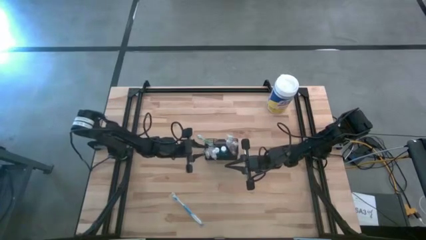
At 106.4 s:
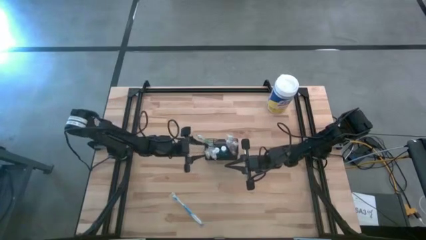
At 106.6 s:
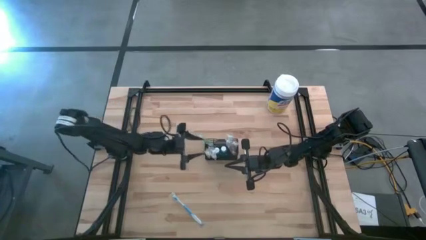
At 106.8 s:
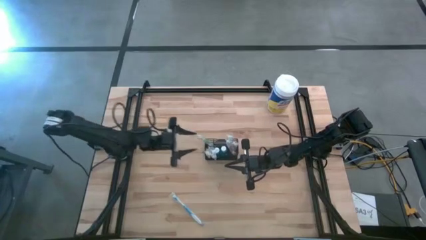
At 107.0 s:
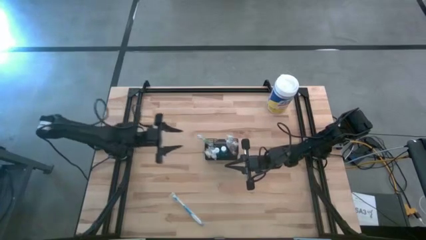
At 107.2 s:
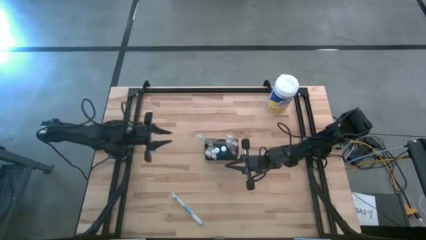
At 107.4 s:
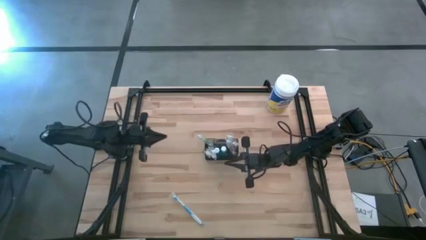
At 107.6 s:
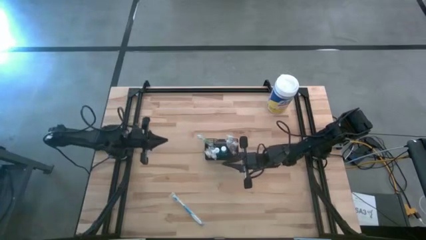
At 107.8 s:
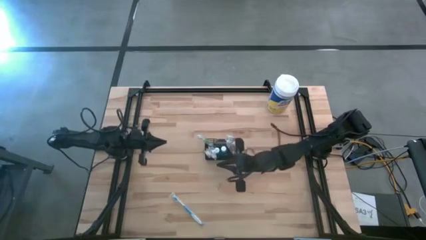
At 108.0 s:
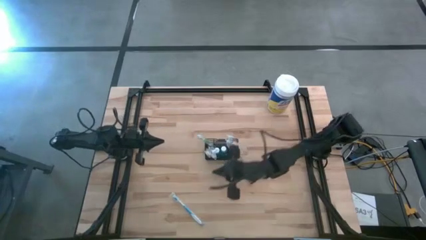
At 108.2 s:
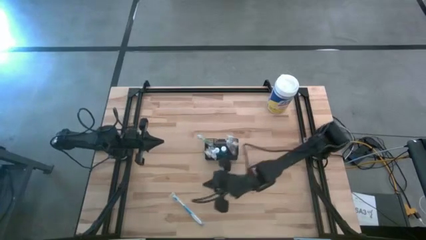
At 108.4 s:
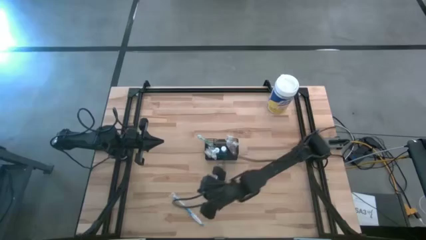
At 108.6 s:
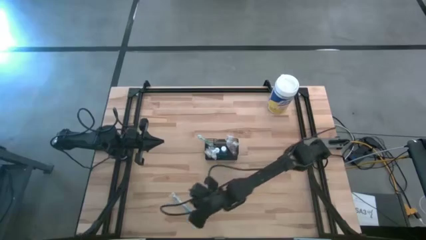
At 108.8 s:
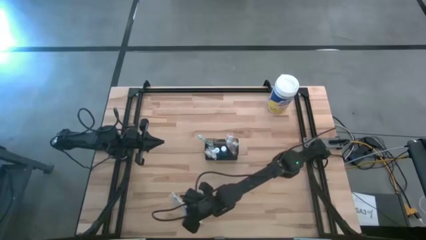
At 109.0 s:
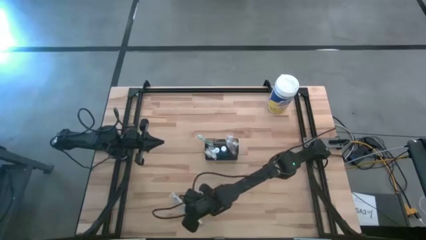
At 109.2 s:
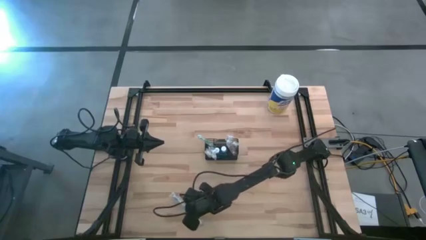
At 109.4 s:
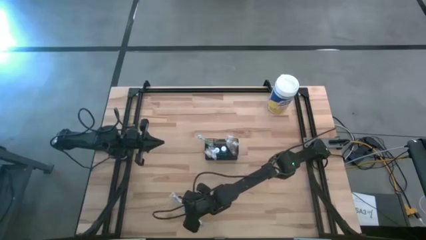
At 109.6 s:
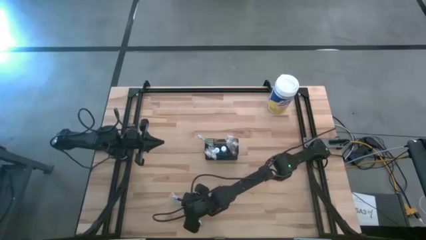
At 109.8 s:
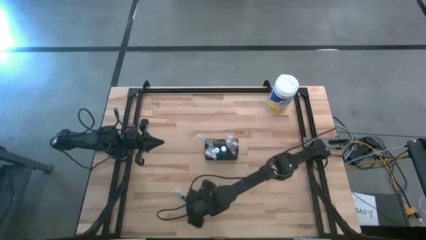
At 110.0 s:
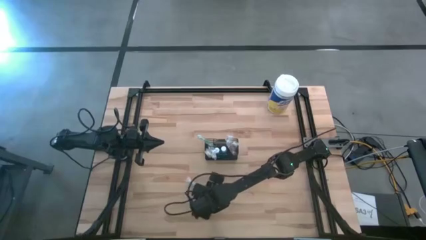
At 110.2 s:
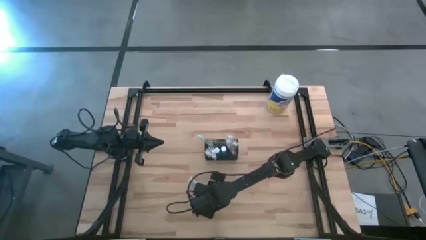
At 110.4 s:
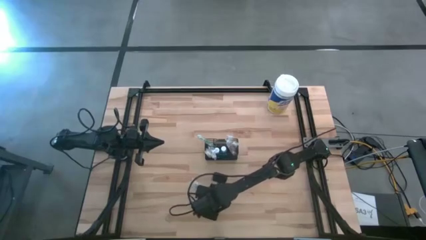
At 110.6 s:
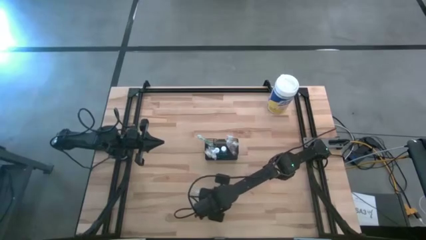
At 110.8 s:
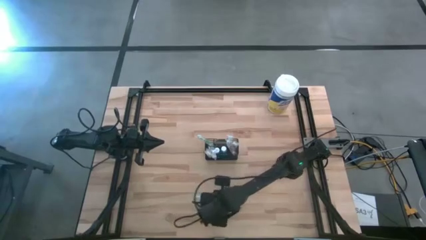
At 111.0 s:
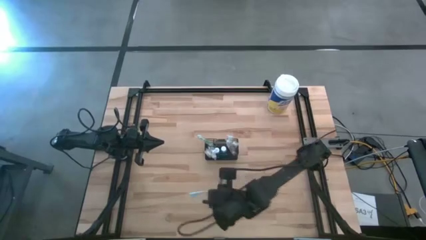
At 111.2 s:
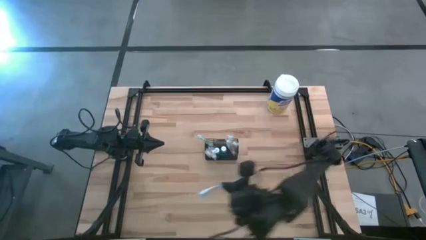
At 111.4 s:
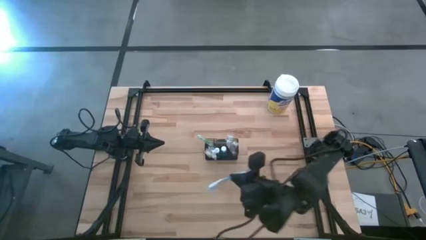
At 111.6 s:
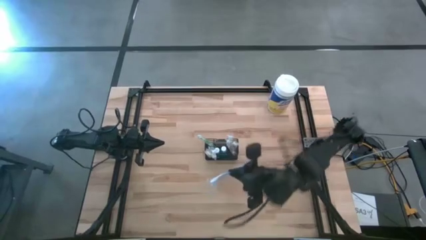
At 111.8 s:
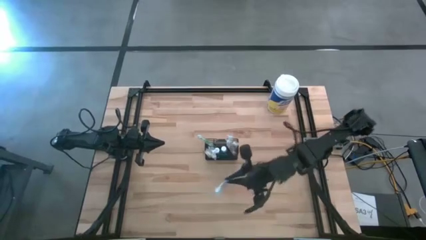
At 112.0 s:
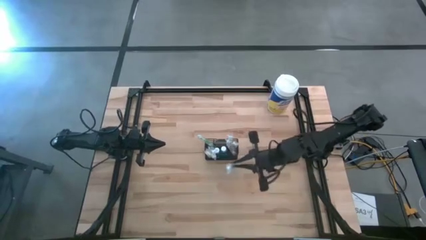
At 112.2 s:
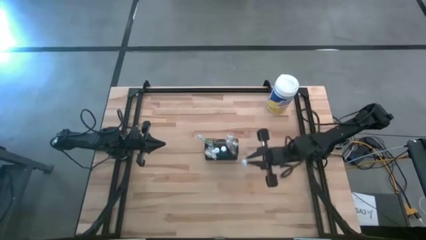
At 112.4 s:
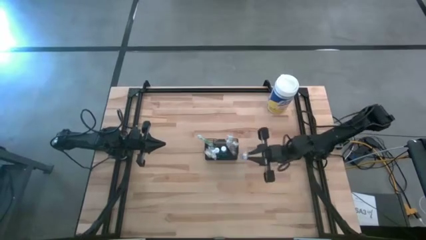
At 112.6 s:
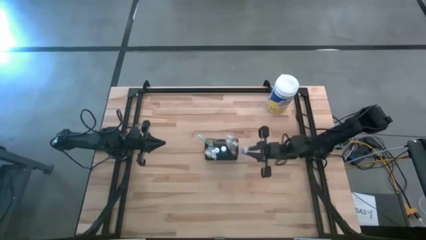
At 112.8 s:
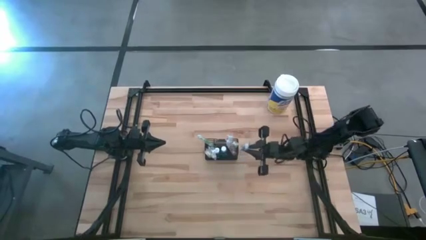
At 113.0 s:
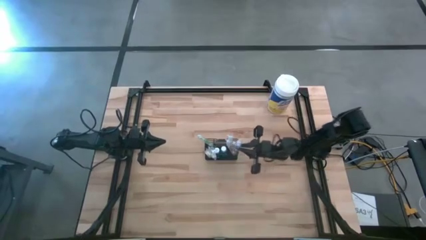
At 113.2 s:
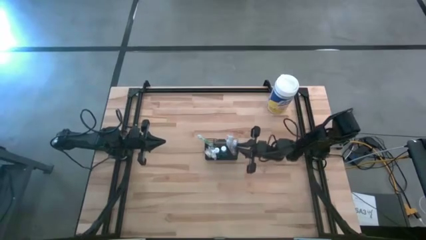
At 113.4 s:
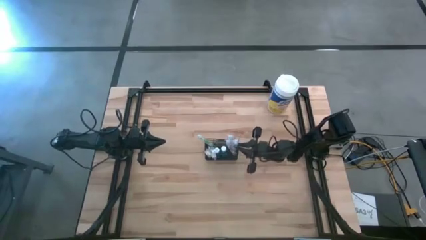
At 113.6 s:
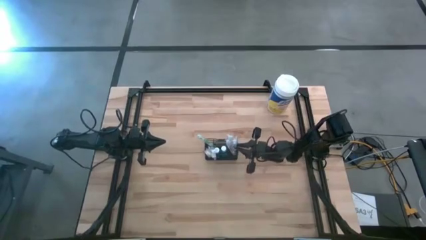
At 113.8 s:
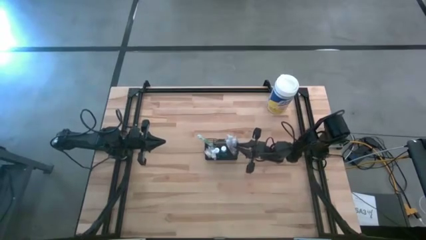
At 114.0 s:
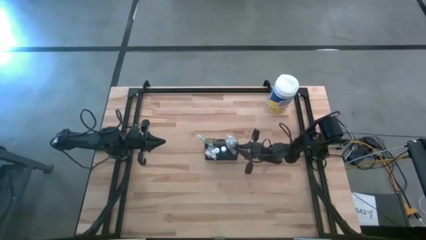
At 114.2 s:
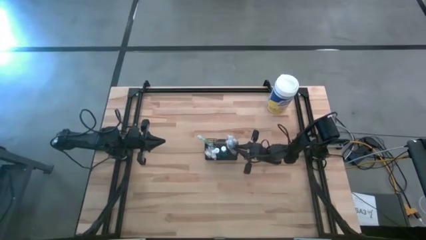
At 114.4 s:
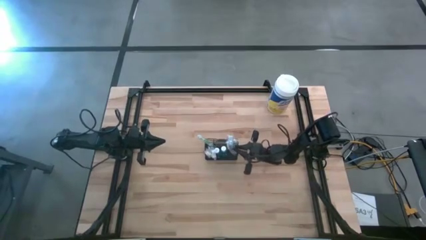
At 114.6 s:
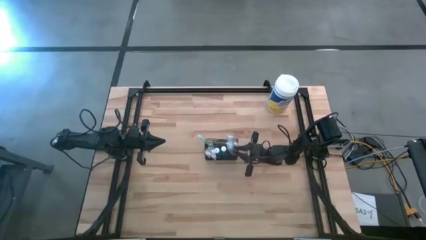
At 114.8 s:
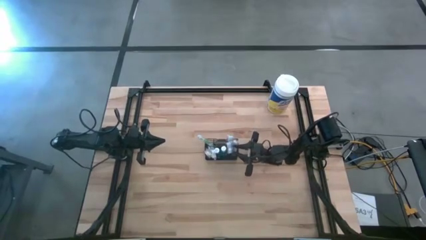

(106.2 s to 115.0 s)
Task: Pick & Place toothbrushing station
Put the blue toothbrush into the black organizer

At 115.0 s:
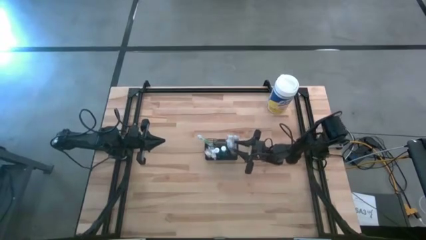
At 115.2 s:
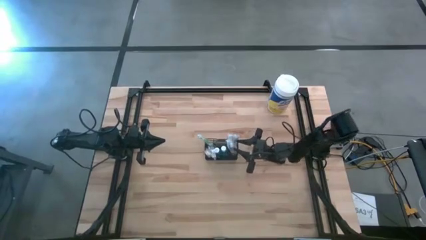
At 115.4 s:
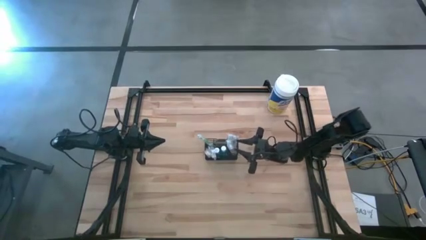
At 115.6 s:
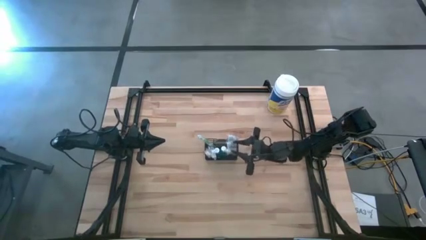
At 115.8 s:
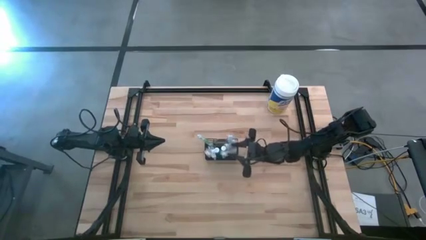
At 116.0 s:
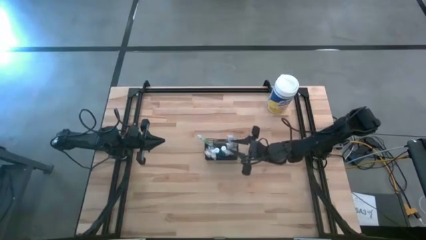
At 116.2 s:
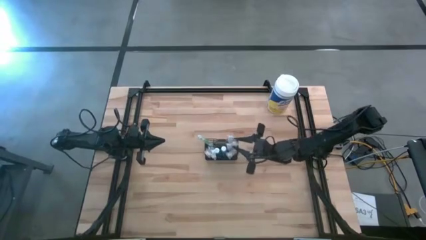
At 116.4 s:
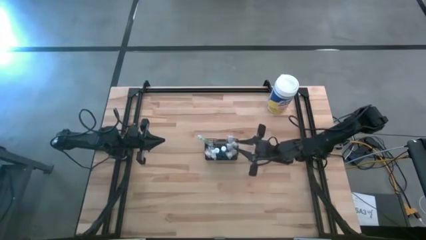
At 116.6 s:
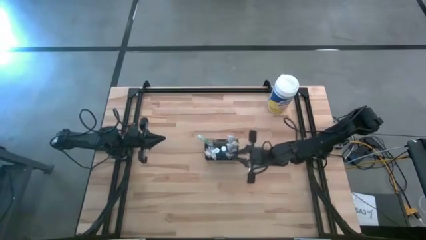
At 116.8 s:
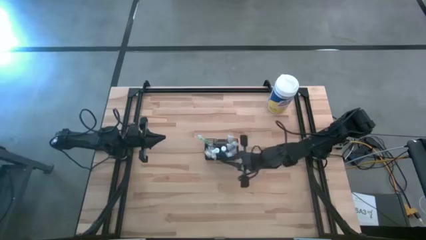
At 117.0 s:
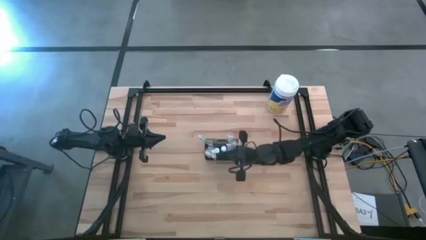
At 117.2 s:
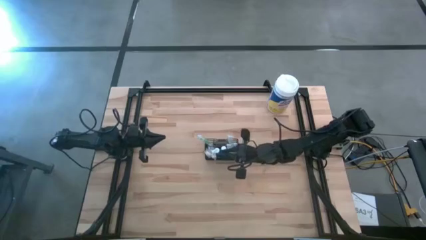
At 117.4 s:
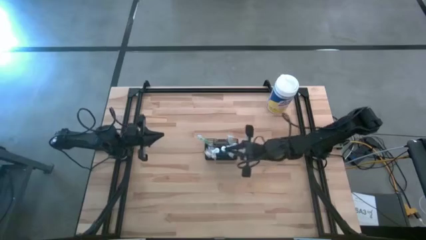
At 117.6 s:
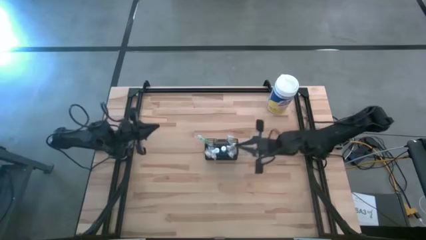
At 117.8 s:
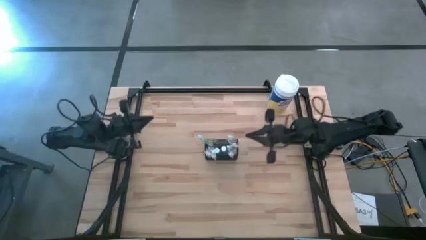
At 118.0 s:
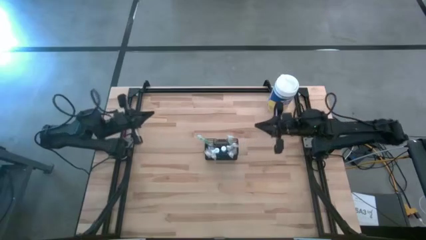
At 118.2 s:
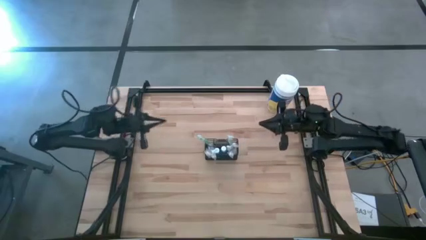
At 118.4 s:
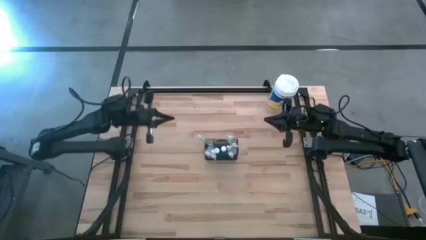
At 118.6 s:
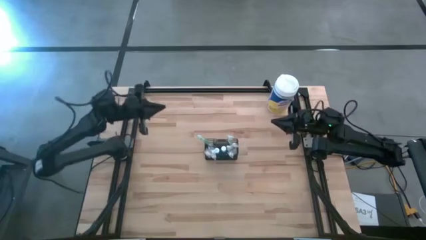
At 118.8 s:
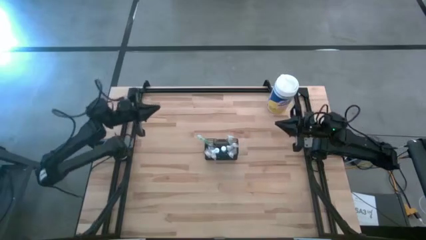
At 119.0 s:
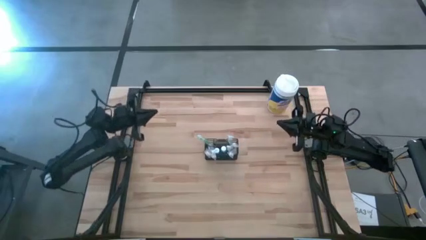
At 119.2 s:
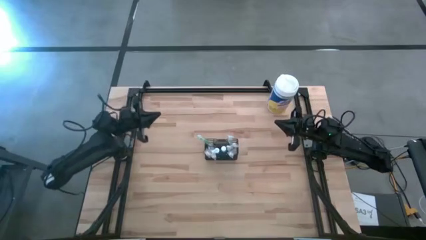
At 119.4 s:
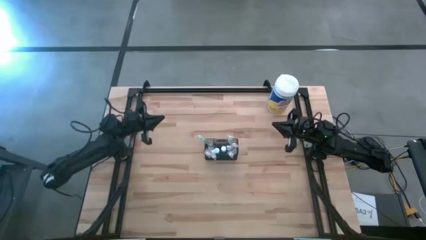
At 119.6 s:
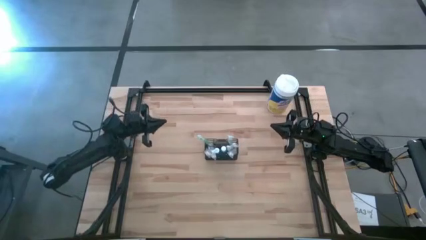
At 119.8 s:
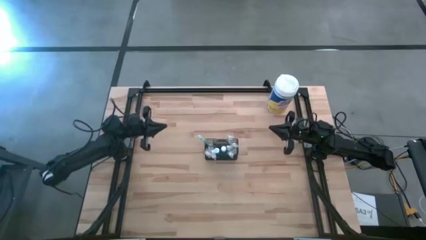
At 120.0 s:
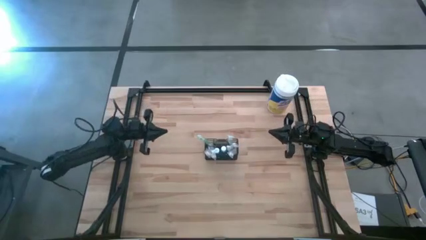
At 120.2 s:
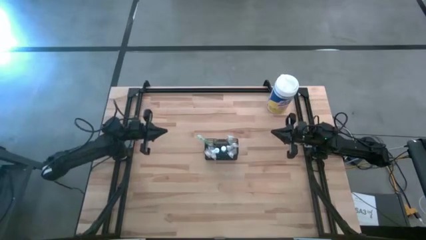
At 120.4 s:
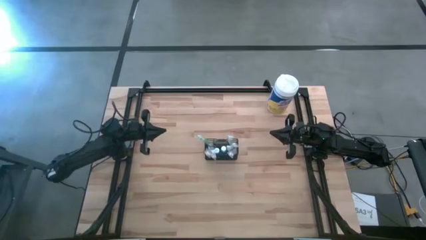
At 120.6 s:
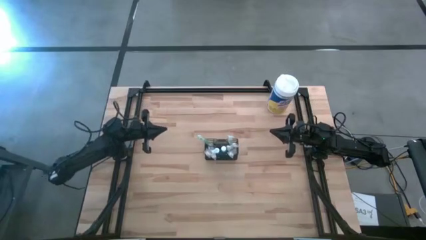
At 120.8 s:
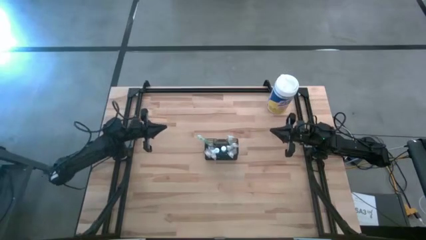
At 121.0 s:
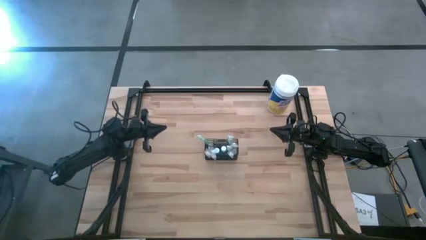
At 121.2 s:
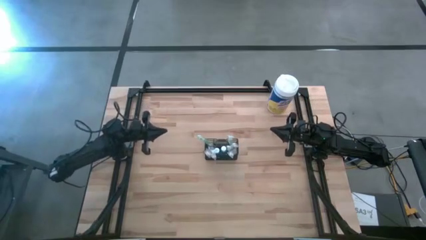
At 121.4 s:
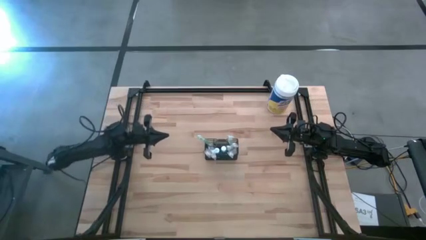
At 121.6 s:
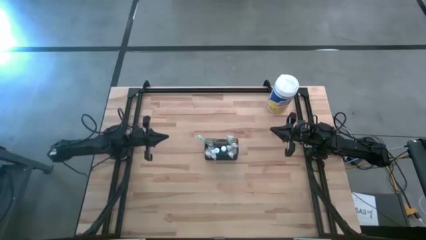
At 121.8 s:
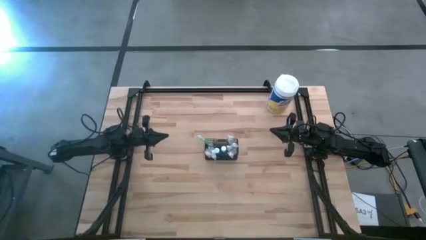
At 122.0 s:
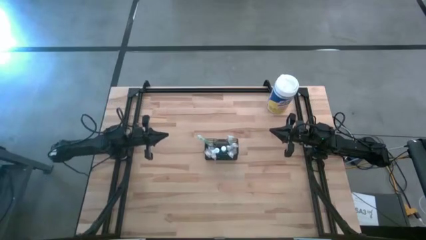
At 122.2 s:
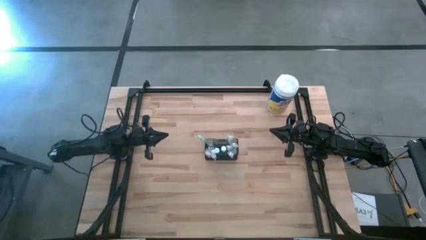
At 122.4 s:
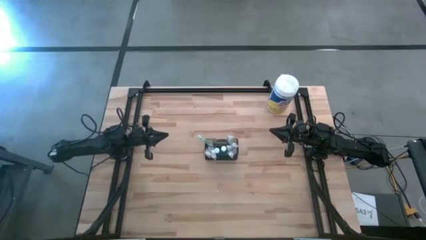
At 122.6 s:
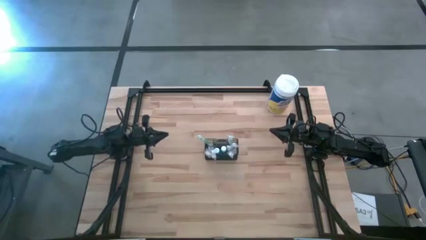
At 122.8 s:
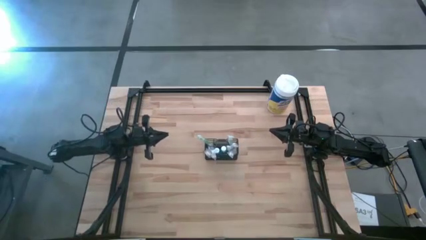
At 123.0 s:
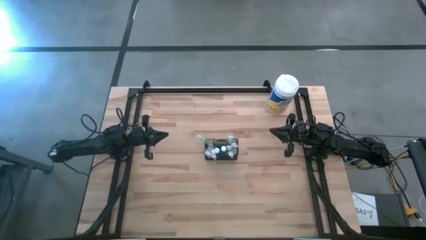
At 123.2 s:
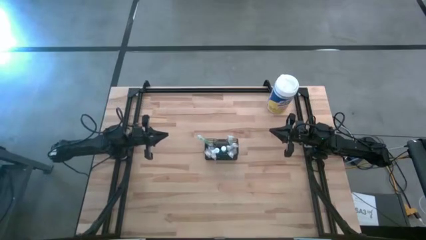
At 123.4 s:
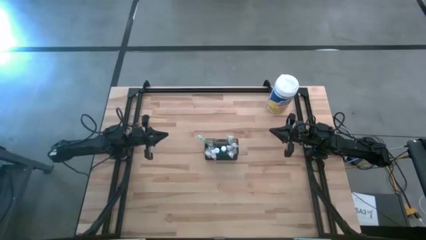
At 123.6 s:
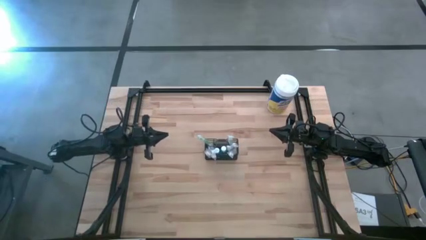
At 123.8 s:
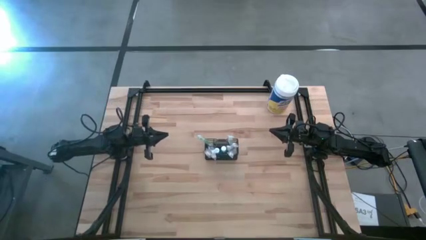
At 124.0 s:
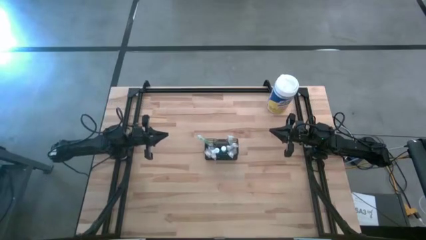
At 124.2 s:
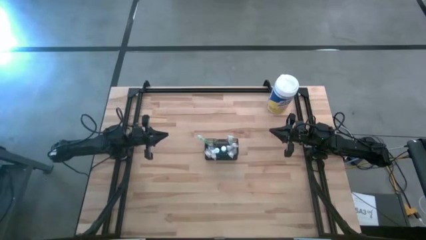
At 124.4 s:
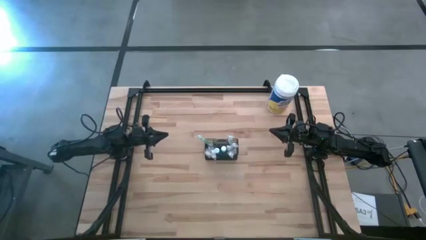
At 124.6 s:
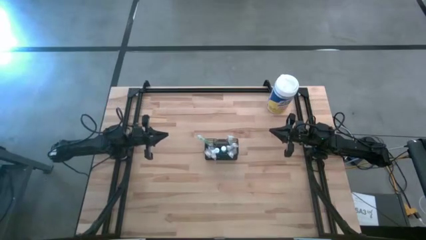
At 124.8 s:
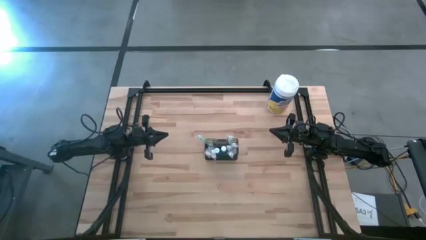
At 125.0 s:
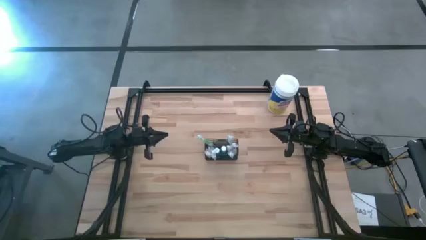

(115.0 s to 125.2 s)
Return to Home Position
